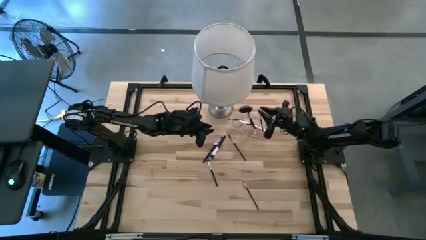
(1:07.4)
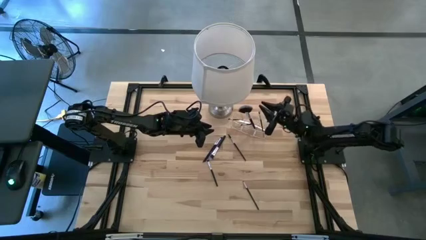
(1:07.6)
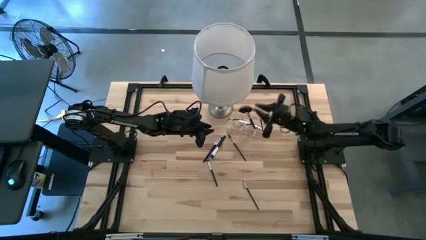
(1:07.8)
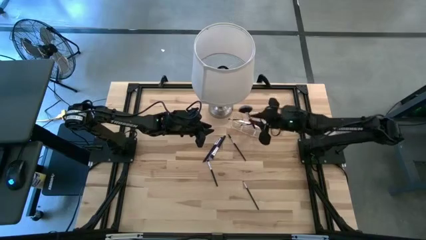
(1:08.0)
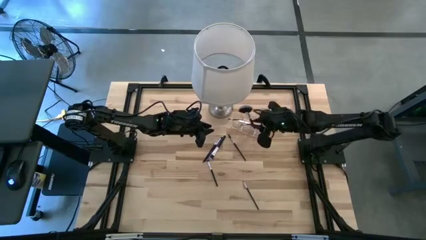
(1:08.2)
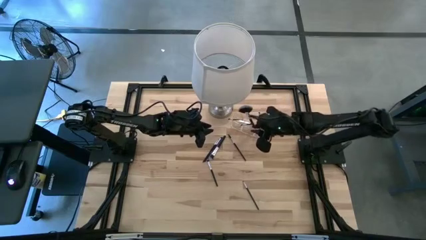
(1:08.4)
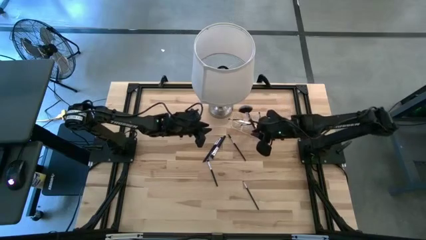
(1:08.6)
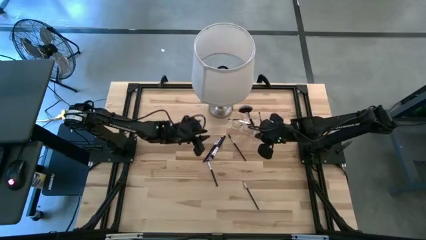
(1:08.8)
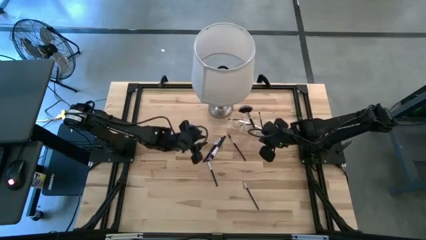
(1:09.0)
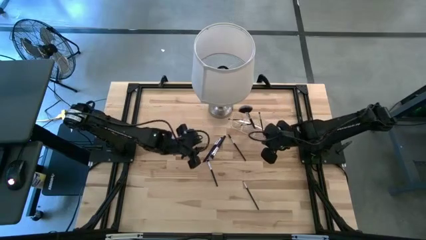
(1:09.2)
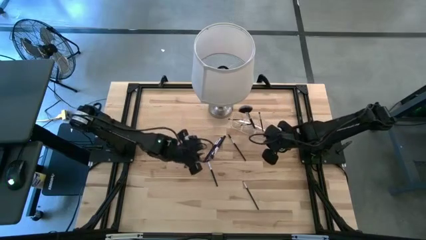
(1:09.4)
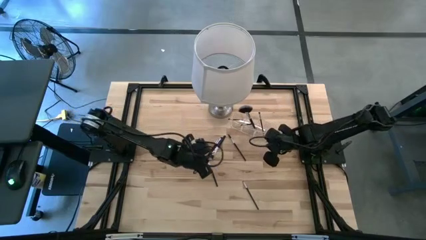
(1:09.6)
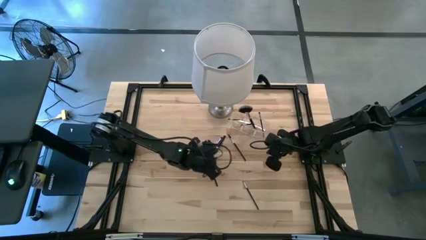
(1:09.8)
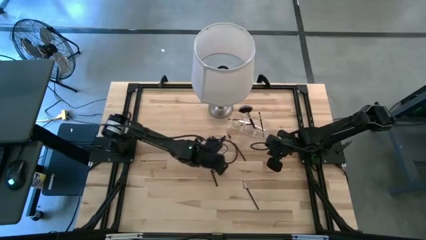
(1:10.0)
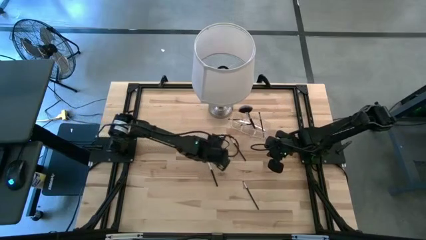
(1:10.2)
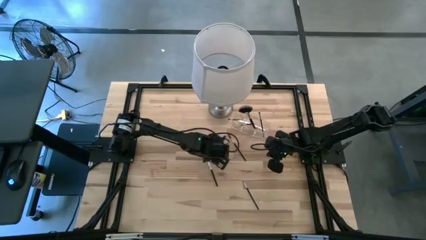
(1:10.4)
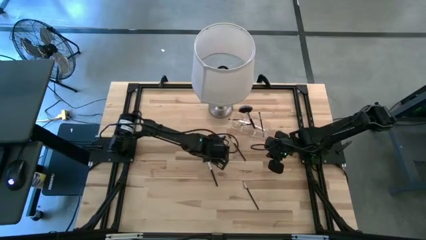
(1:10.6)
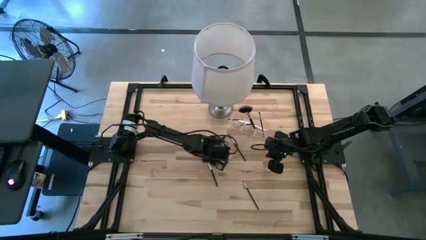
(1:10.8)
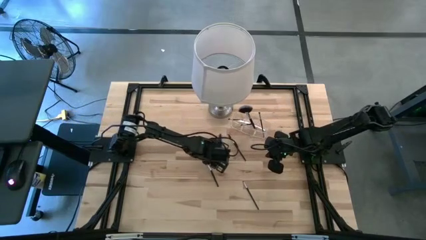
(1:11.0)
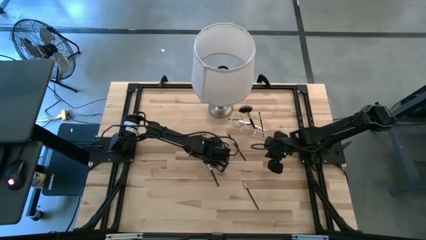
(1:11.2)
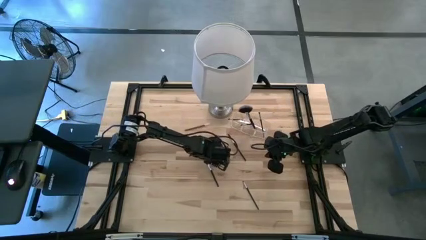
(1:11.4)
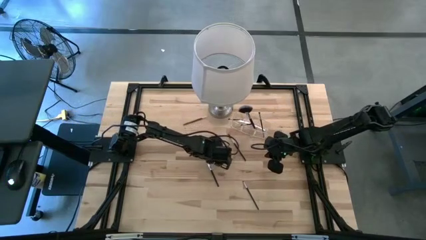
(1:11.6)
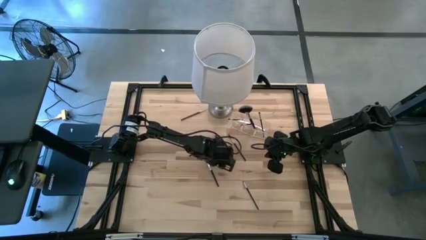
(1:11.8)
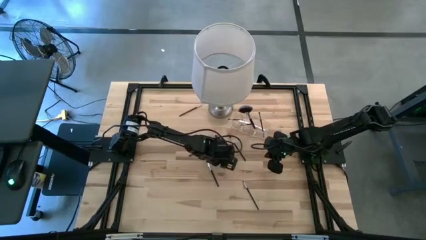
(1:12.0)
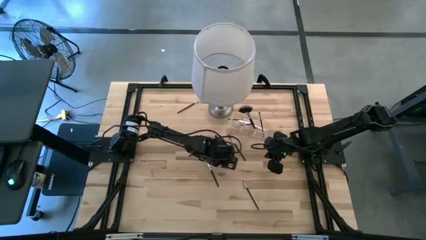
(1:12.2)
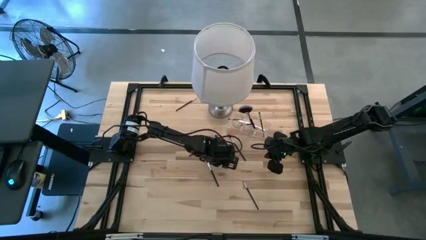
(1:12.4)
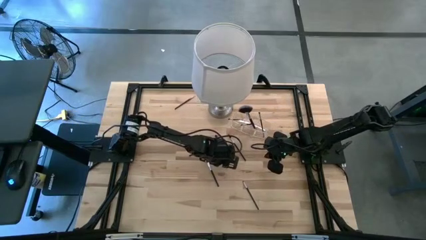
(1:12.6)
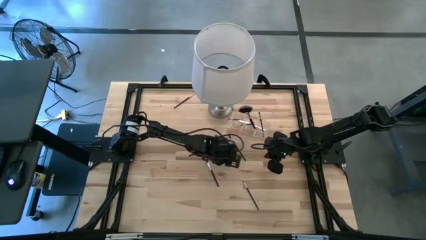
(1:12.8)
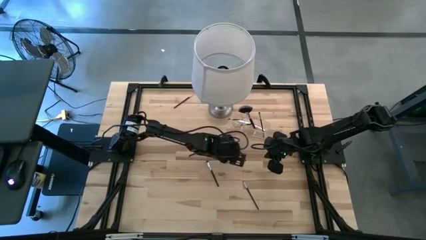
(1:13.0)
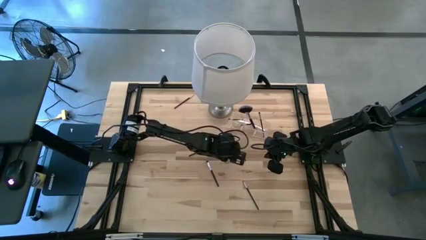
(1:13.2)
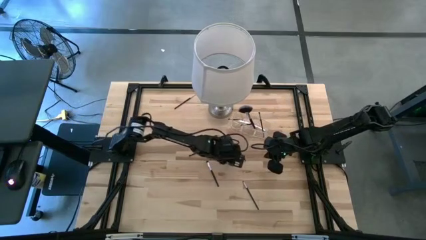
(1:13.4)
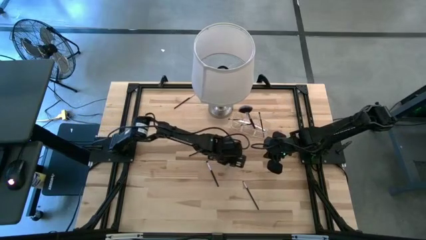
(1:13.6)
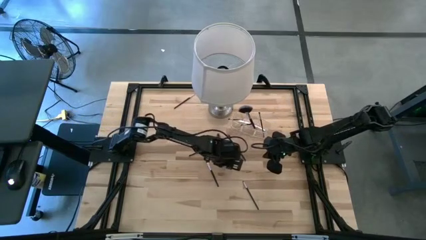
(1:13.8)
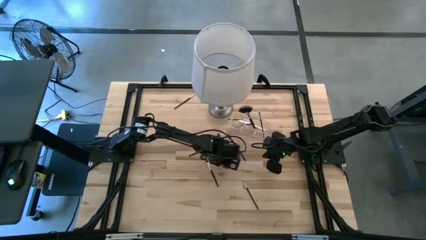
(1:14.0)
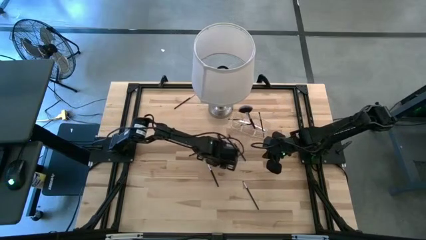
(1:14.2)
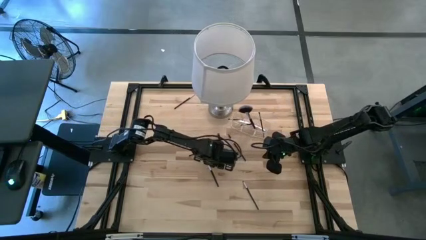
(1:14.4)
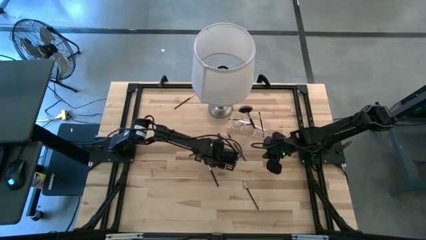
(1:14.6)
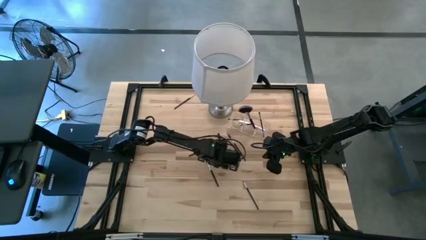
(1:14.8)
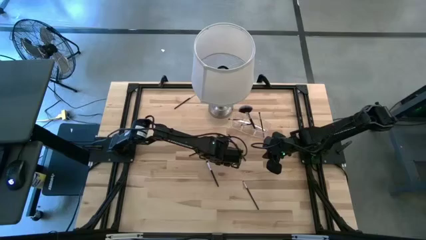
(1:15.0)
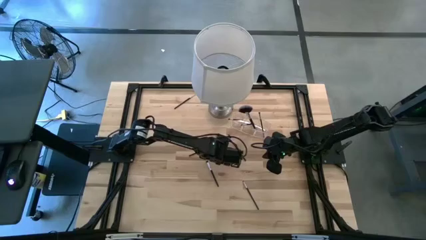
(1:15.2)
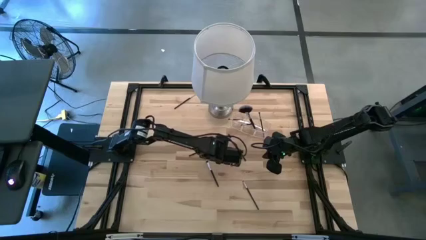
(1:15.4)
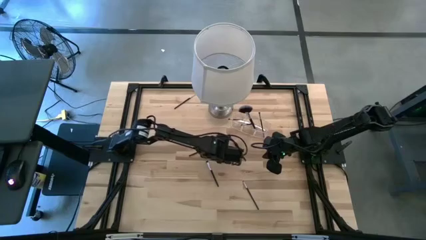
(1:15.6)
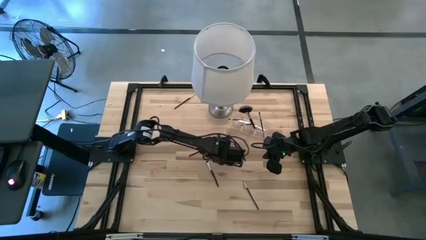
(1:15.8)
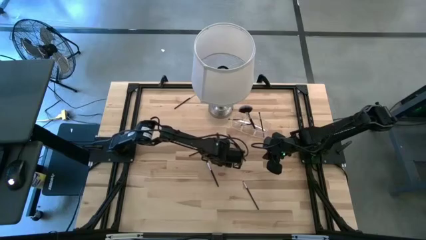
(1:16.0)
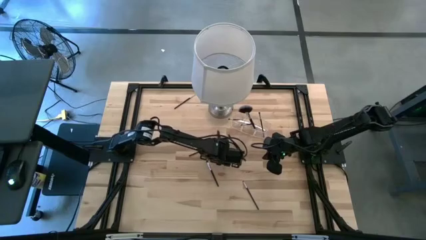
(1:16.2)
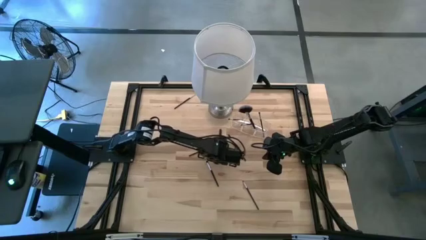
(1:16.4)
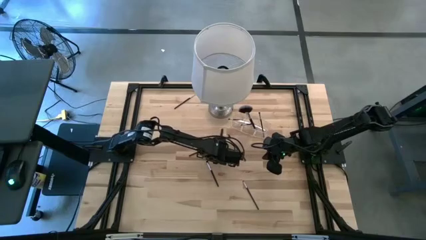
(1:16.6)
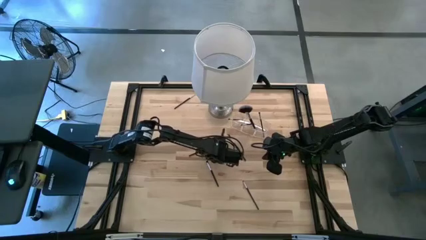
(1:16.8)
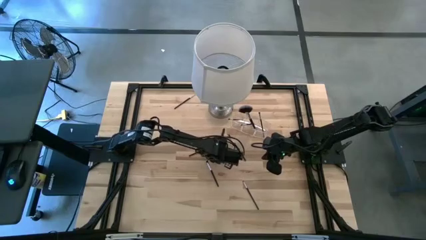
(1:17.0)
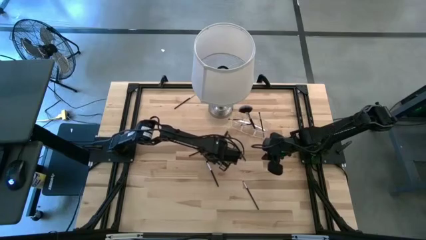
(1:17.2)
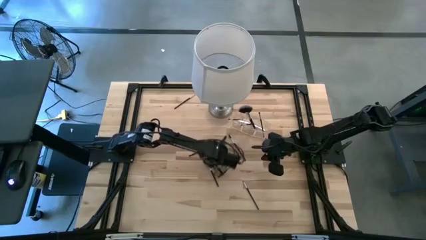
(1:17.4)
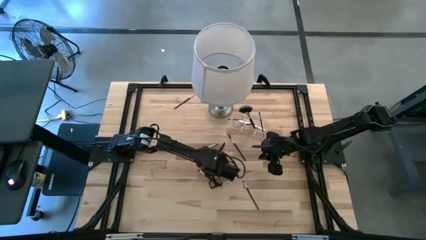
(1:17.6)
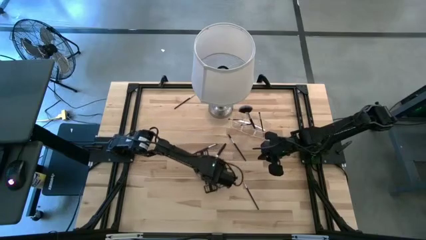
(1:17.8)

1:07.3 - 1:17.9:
Task: Put items in baskets/containers
Put the foundation brush into the transparent organizer

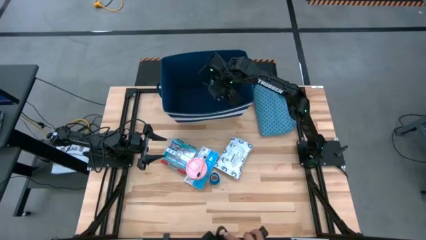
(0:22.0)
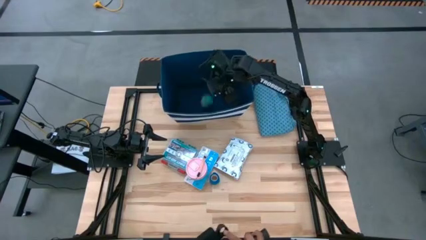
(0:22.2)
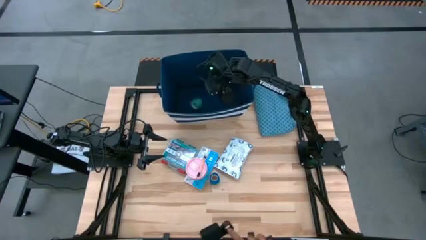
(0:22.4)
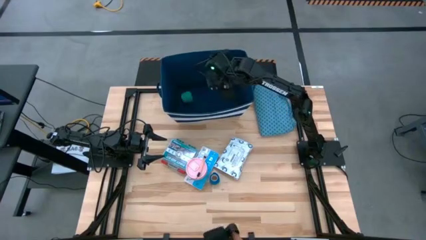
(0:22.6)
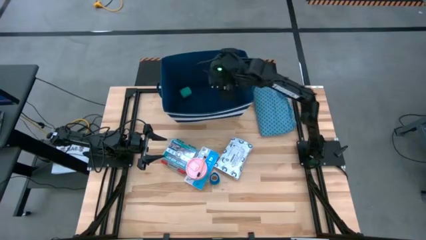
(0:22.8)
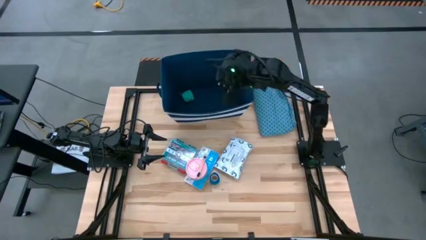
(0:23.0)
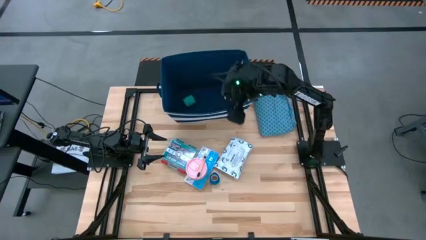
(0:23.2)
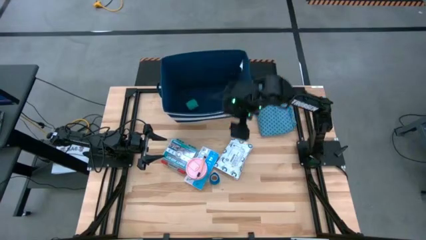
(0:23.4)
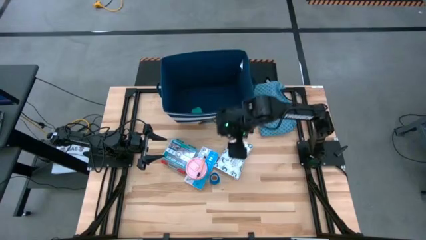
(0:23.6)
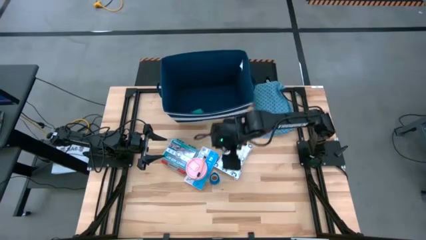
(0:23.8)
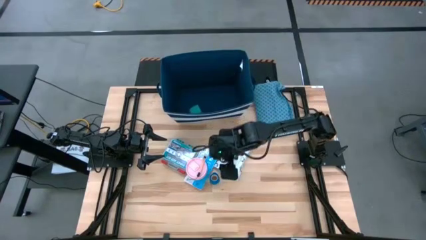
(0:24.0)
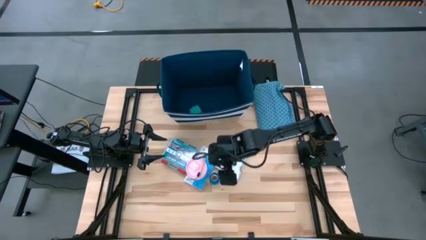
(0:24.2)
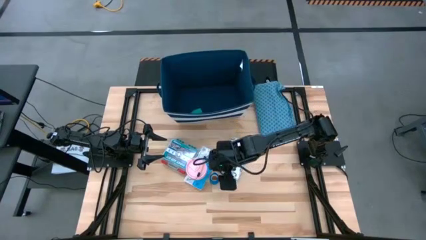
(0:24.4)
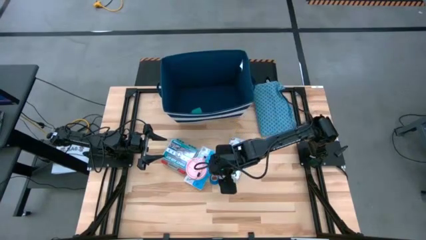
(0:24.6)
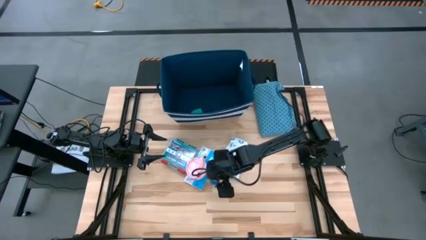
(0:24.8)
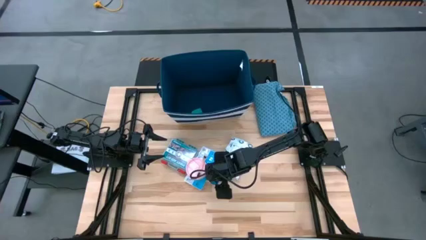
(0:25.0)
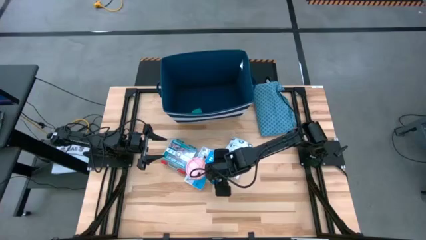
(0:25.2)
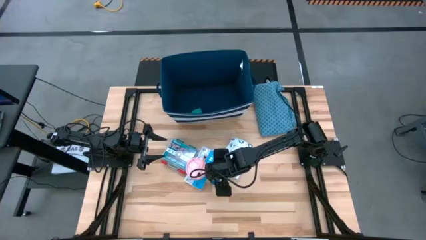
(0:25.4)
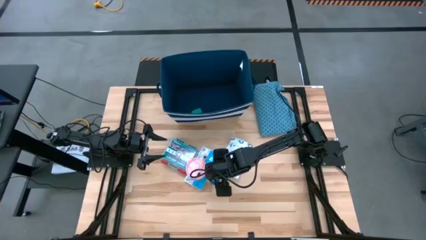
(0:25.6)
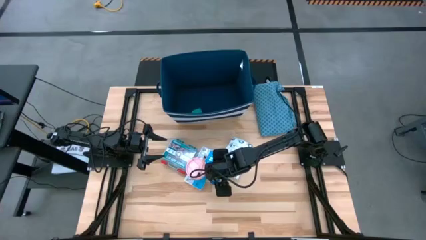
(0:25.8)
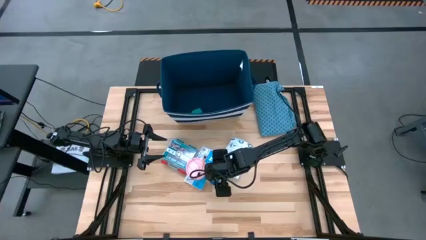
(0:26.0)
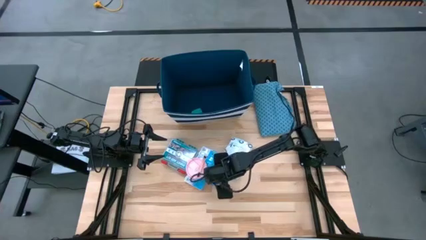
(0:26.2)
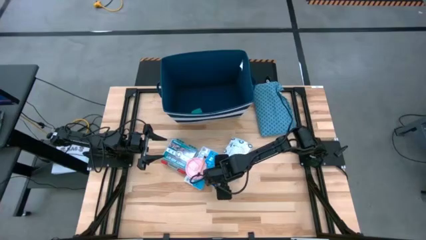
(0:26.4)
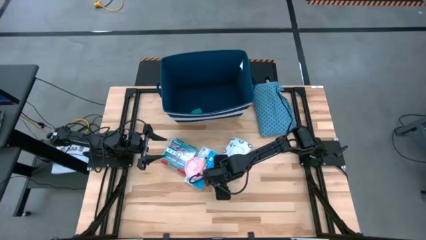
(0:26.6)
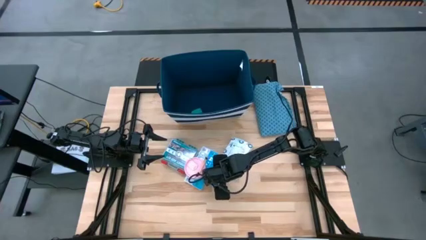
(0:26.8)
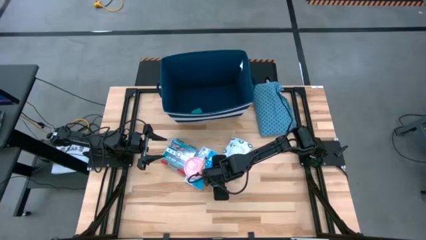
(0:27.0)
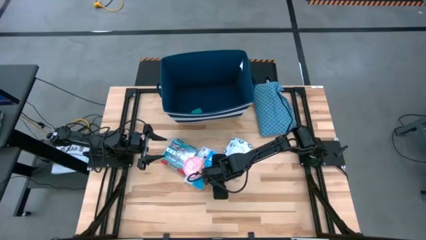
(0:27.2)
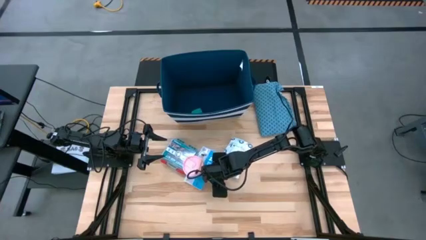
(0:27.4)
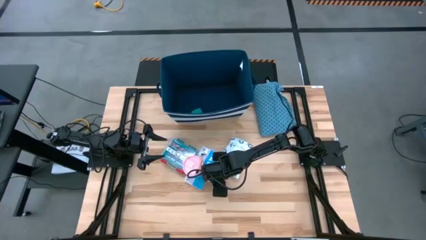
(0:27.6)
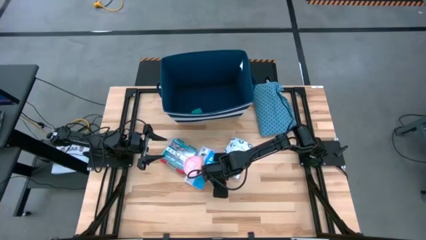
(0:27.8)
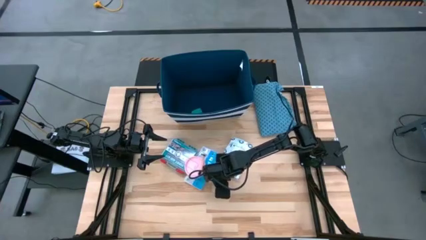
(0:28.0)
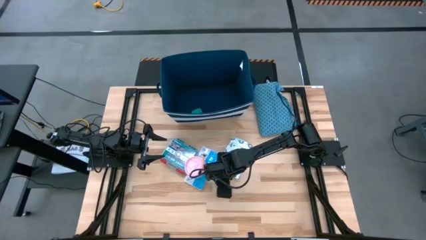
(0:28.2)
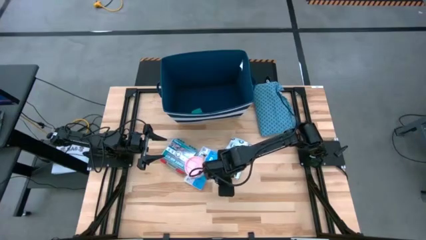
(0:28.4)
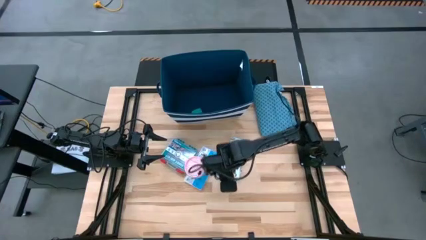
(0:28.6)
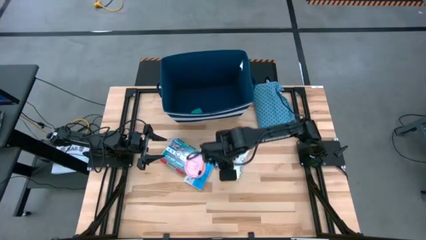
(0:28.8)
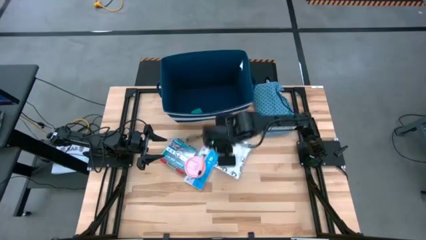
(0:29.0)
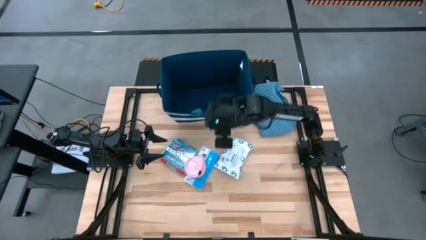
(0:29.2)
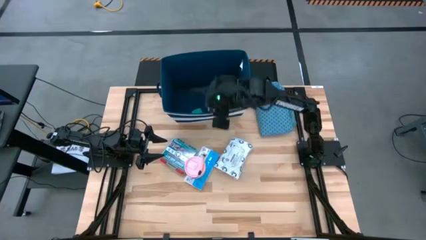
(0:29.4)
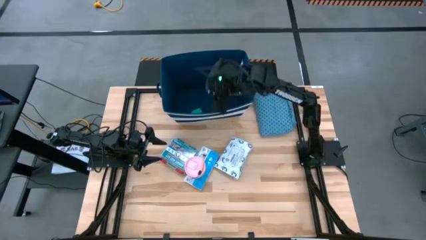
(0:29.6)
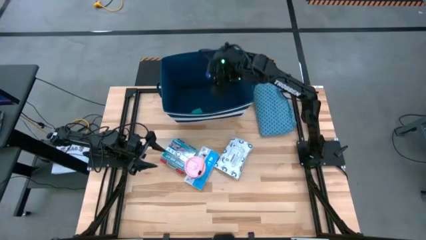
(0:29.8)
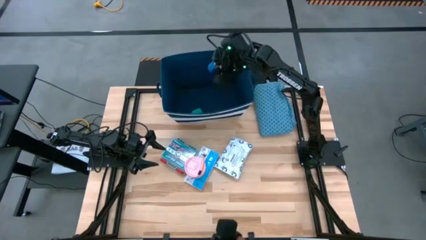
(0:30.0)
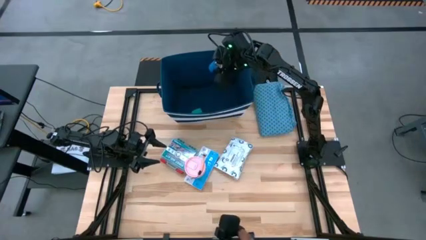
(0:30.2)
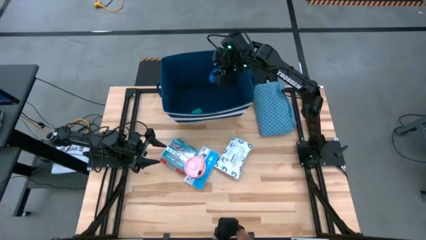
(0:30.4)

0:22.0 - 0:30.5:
Task: Pack medical supplies into shirt
Put the blue tape into the blue patterned shirt
